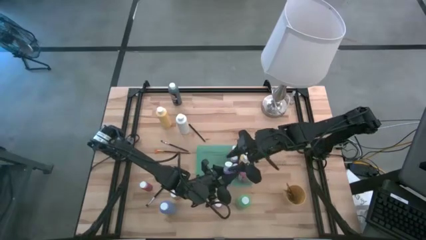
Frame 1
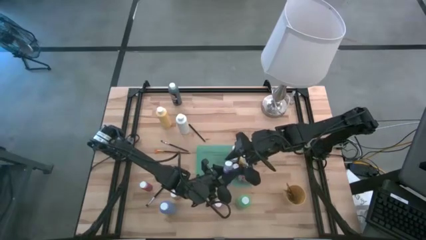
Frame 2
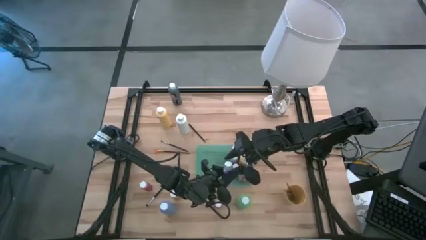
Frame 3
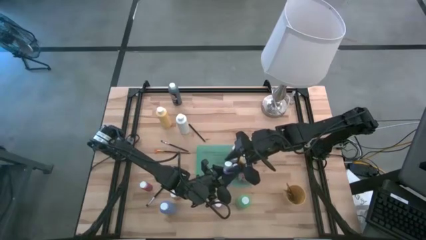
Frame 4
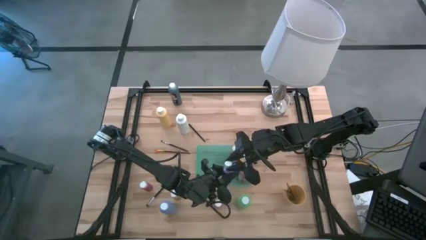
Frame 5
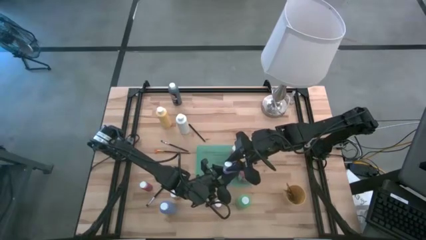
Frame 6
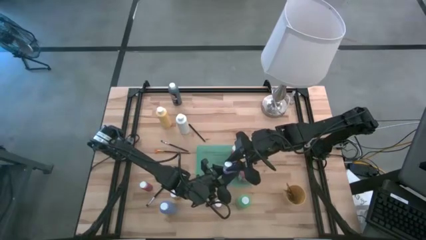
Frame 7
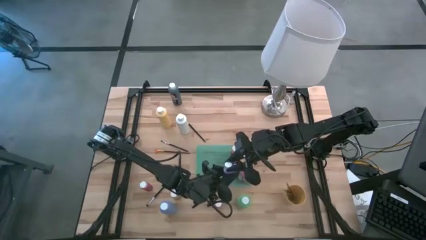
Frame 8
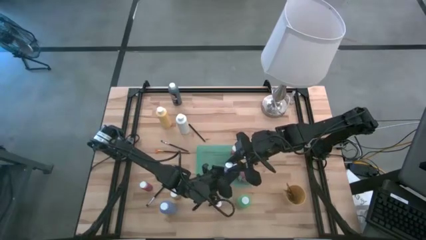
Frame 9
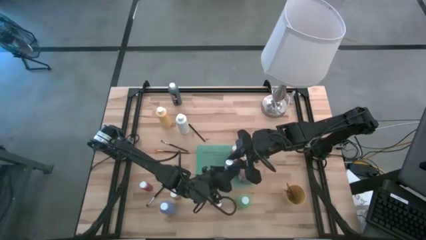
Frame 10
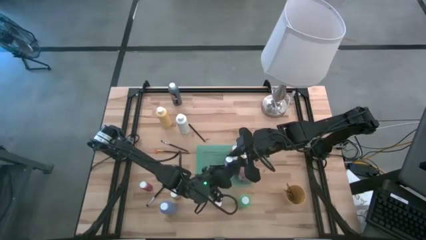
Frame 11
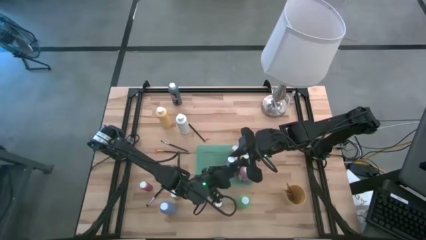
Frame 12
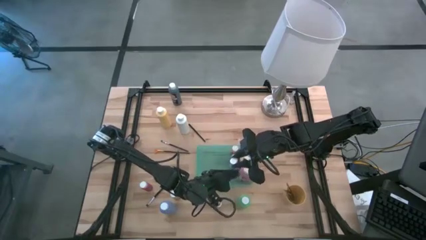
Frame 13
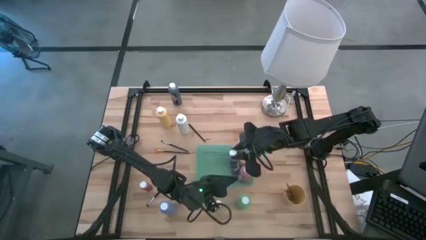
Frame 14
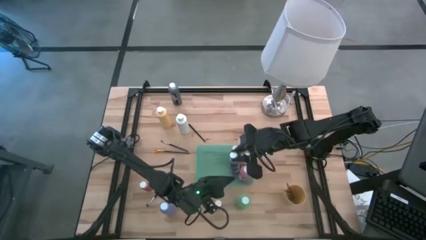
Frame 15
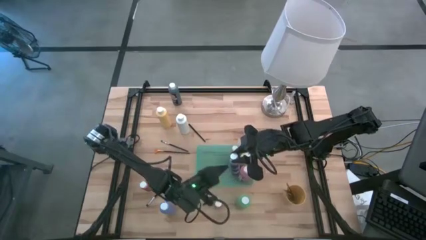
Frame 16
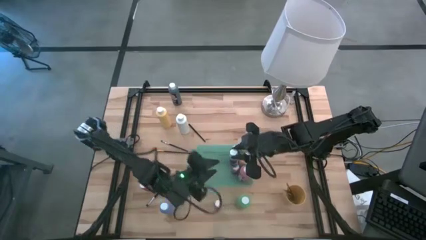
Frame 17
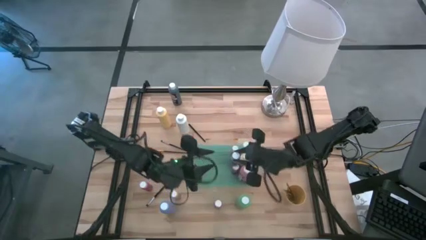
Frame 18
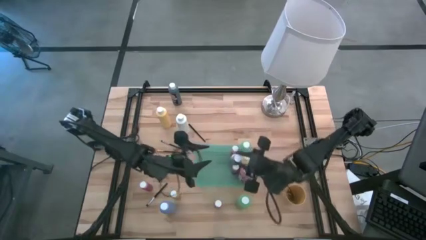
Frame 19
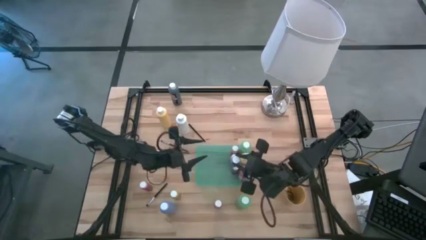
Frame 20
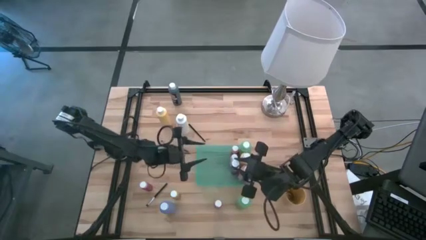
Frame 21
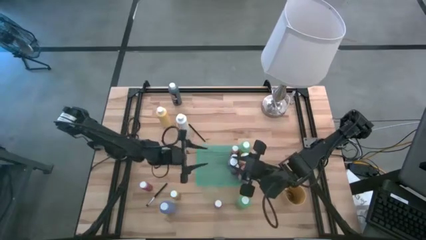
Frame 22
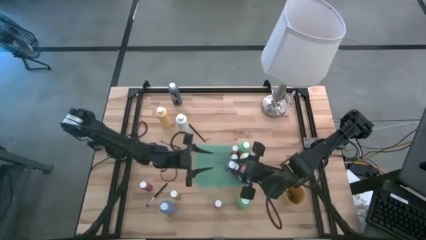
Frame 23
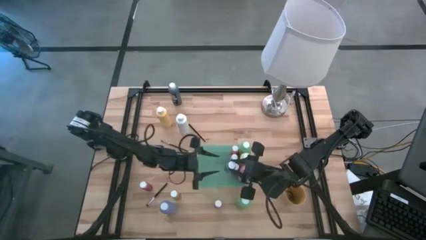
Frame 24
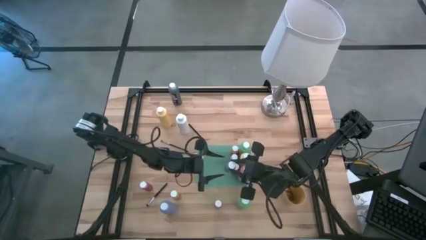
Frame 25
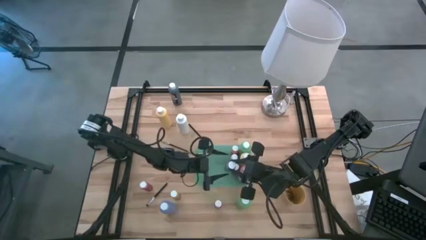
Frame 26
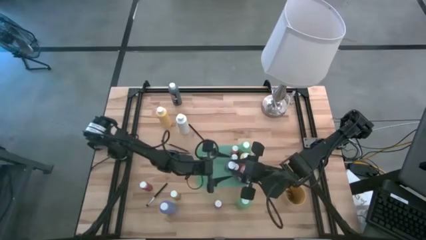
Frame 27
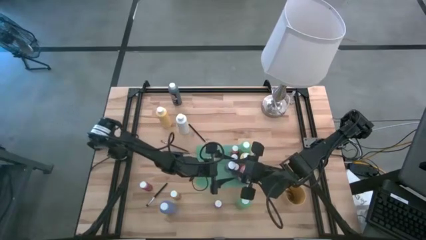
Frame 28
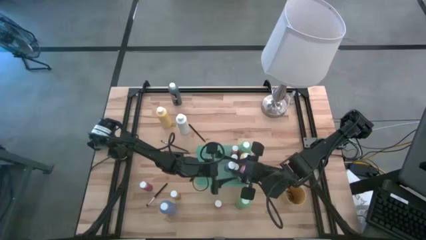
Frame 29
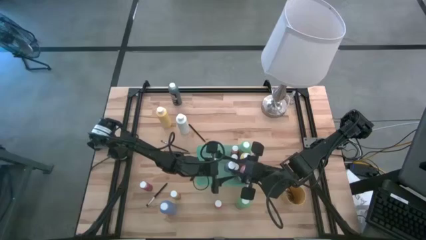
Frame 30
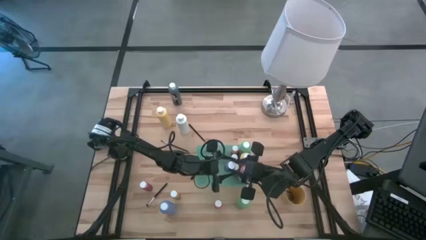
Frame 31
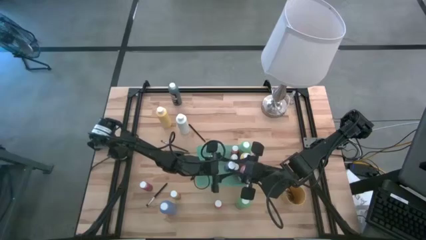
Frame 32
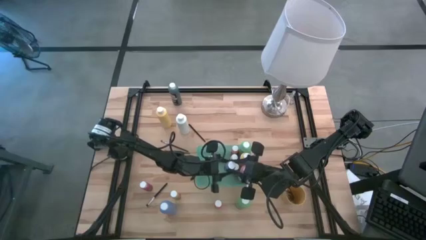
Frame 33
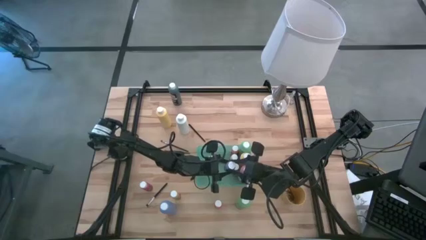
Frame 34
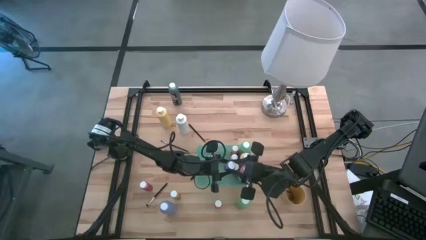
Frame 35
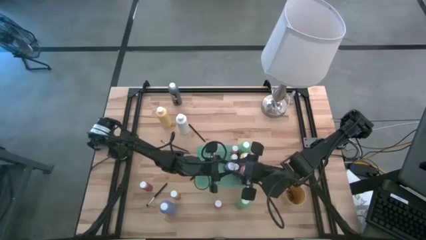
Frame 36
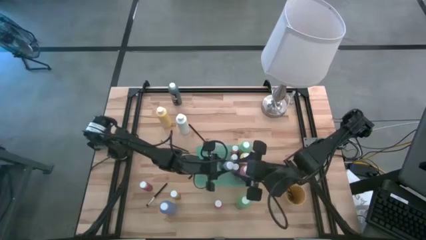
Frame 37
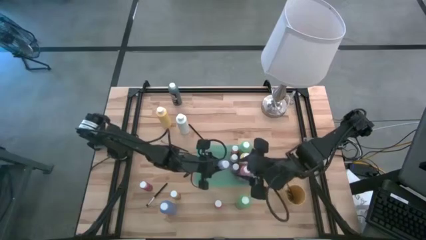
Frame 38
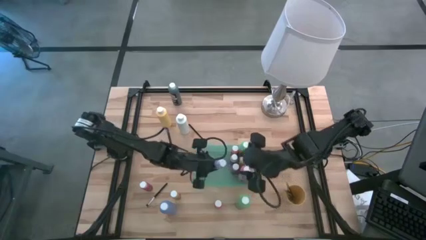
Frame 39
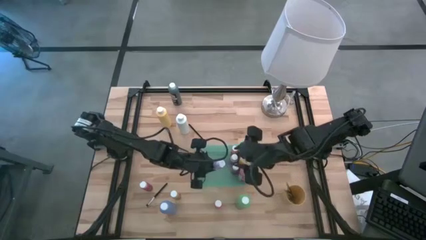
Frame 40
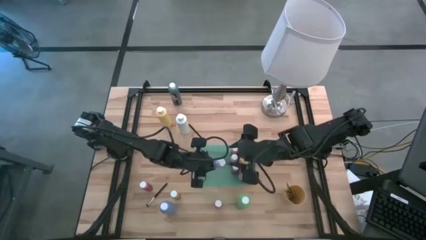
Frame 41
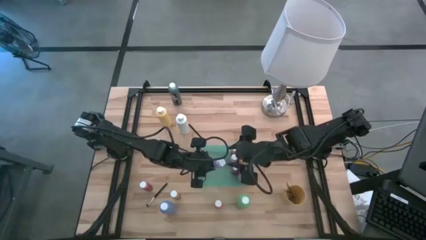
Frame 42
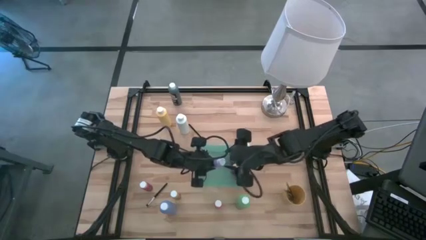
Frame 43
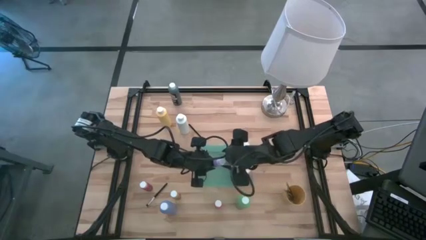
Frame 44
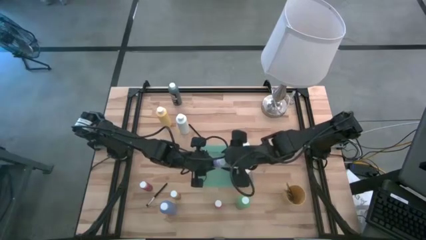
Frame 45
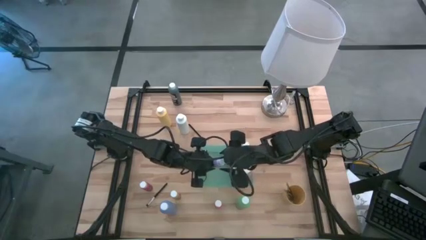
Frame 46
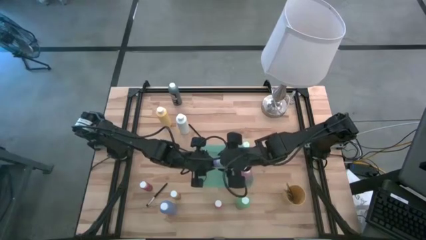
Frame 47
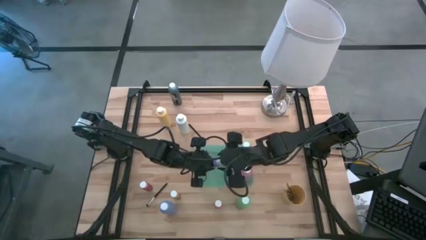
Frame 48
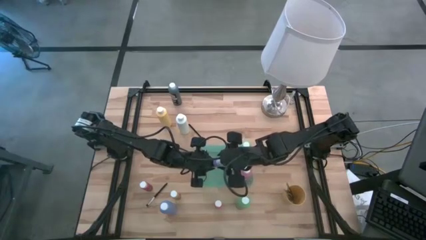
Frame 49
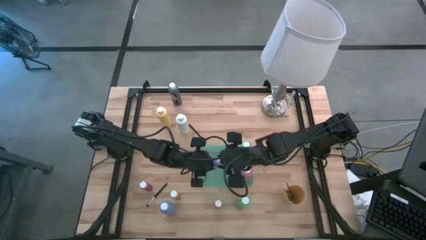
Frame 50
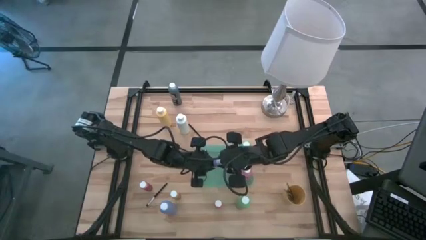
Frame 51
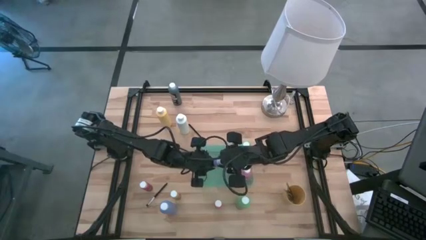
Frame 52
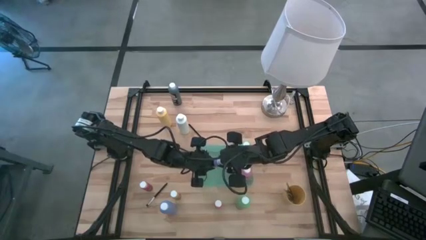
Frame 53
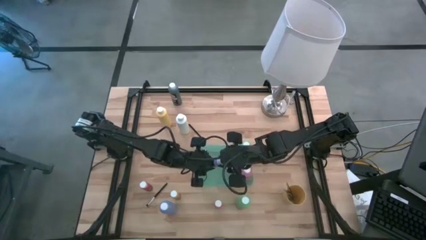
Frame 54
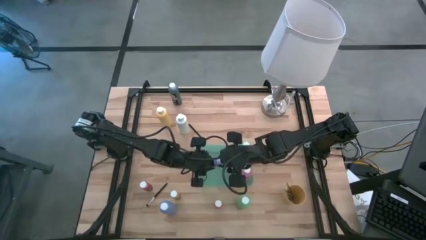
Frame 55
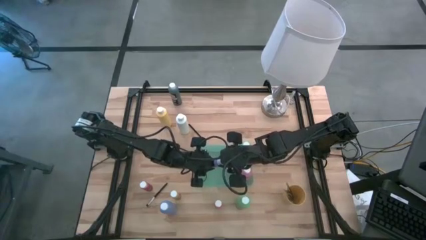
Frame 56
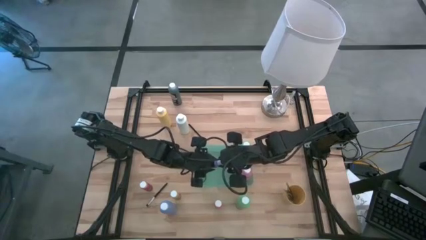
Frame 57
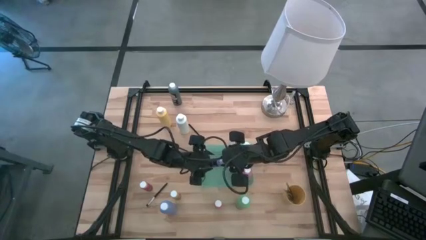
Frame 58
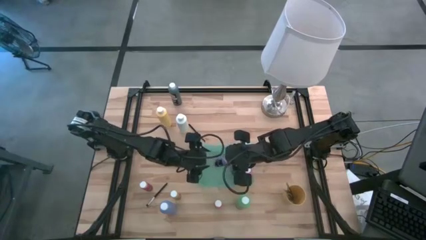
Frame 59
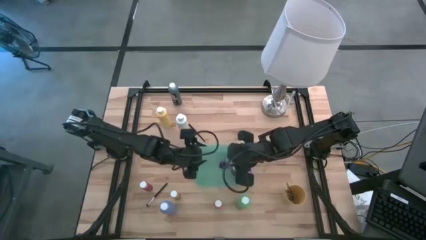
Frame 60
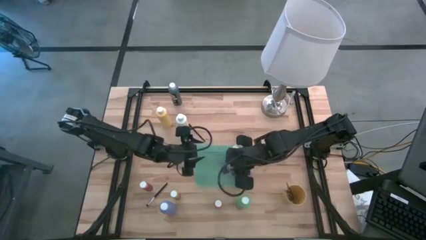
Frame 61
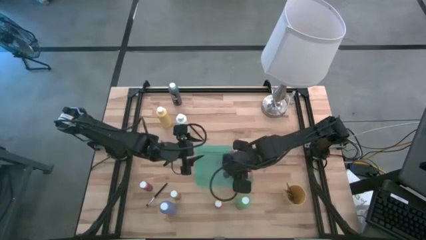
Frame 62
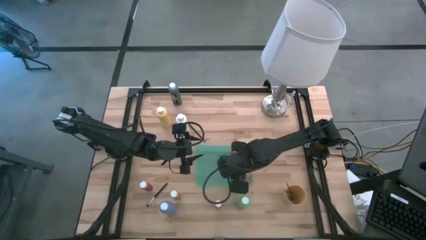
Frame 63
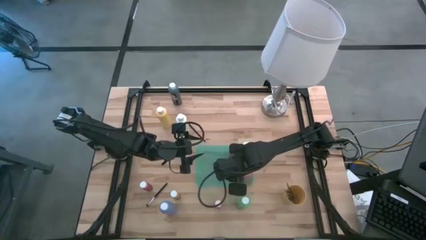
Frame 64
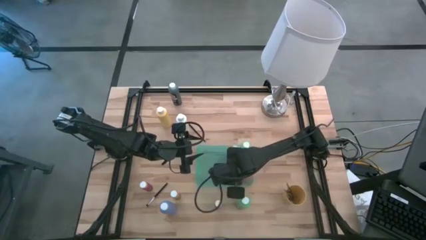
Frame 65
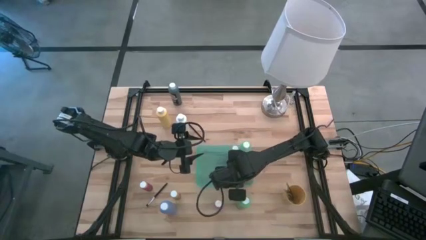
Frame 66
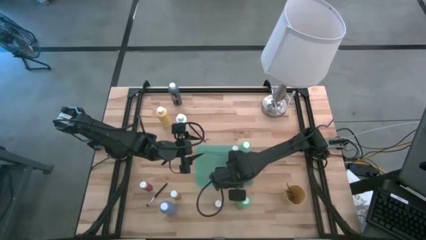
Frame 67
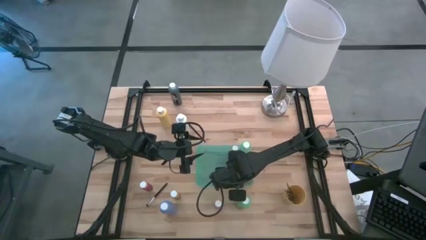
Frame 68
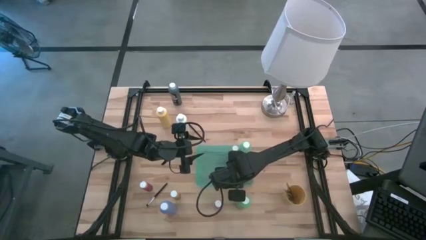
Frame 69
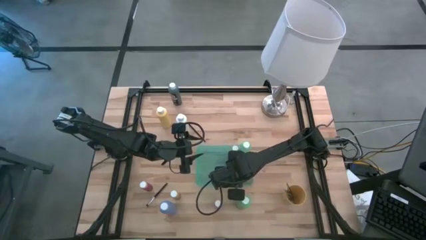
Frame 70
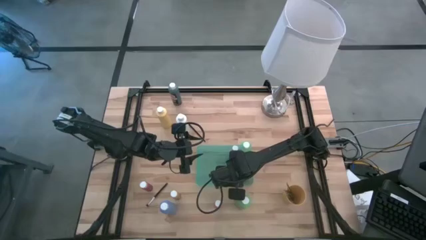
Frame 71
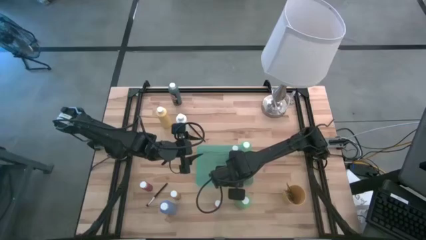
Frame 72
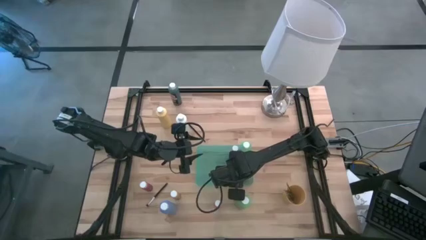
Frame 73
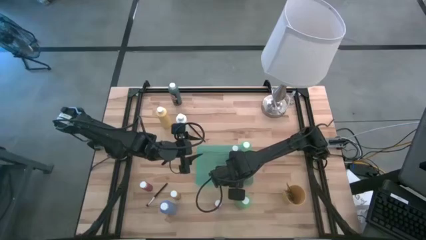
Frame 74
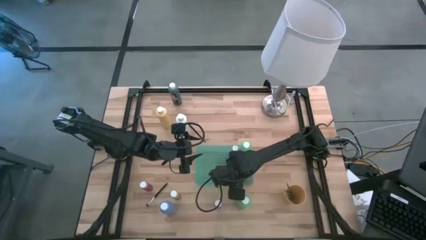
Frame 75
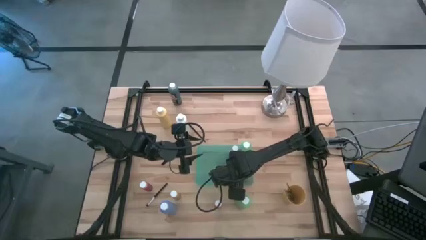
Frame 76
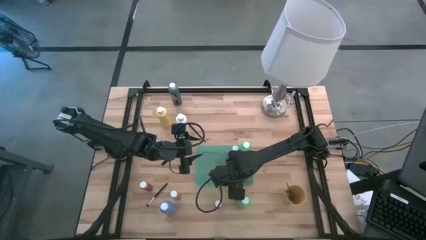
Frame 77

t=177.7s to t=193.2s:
Task: Pick & Place Paint Supplies
Put the purple paint bottle into the green bin
